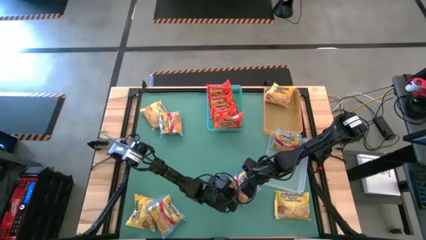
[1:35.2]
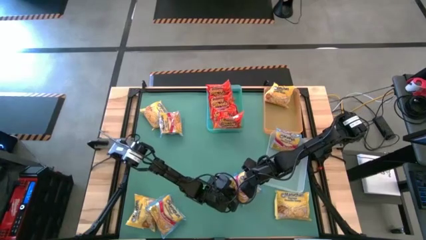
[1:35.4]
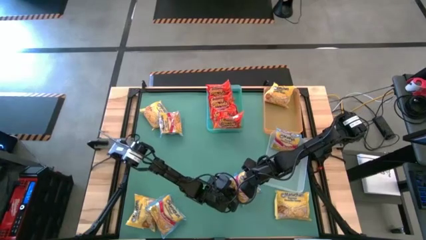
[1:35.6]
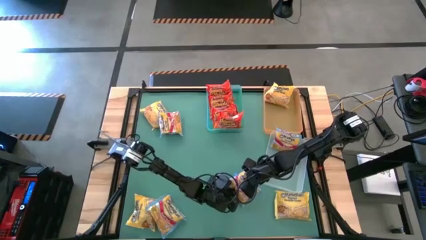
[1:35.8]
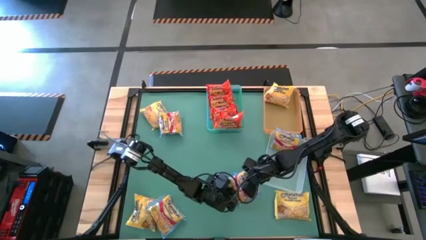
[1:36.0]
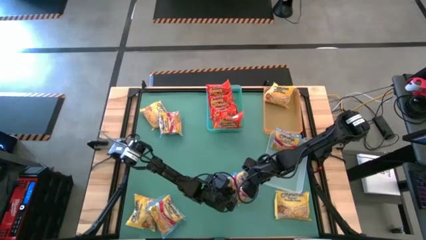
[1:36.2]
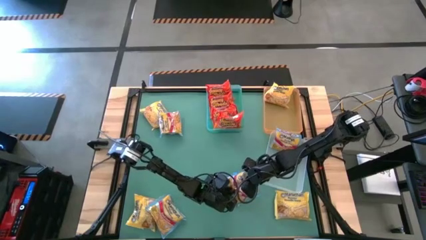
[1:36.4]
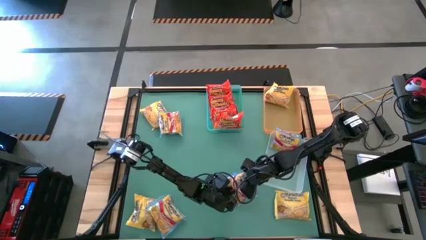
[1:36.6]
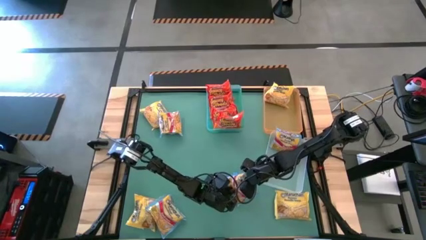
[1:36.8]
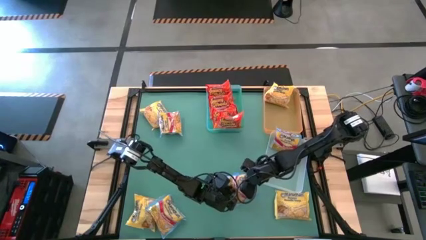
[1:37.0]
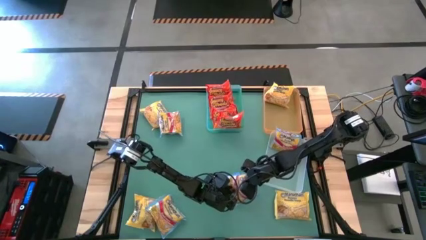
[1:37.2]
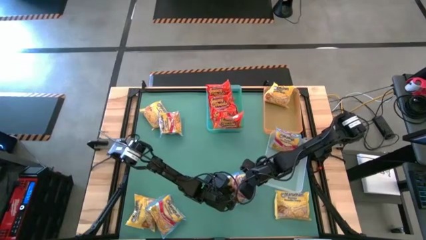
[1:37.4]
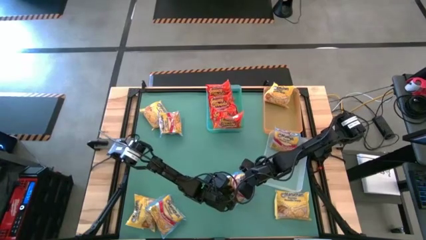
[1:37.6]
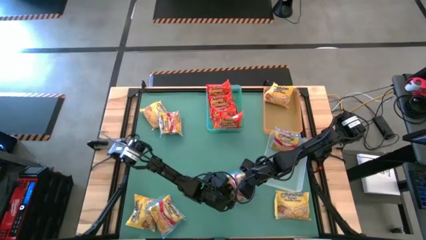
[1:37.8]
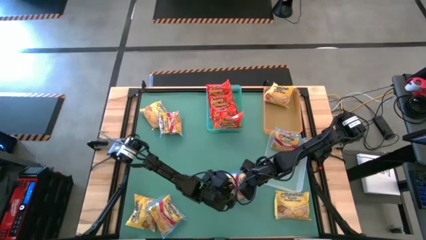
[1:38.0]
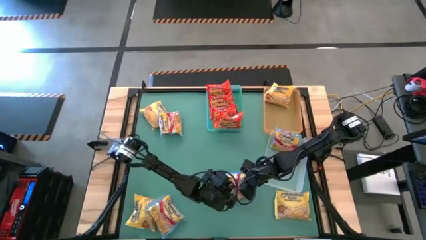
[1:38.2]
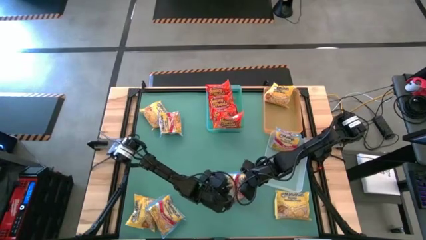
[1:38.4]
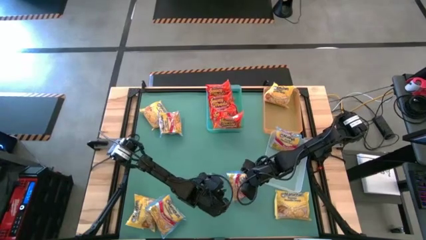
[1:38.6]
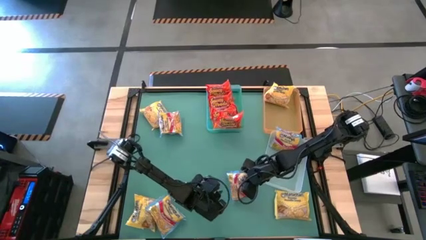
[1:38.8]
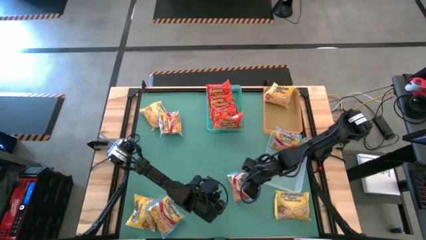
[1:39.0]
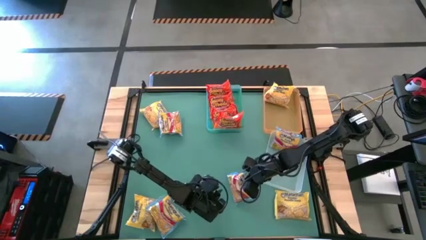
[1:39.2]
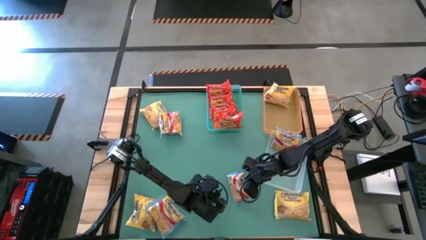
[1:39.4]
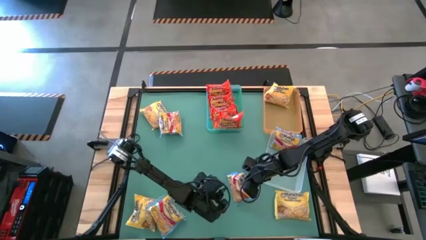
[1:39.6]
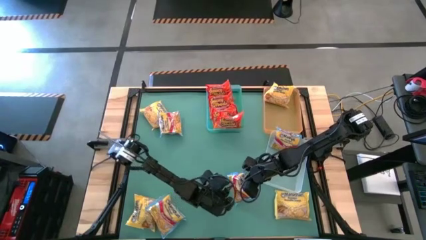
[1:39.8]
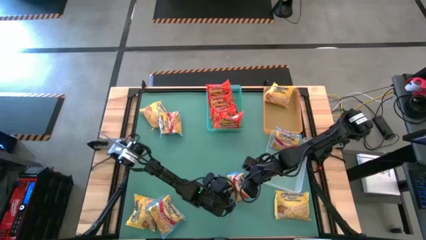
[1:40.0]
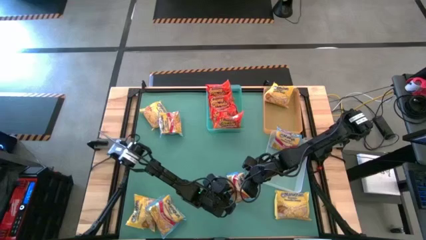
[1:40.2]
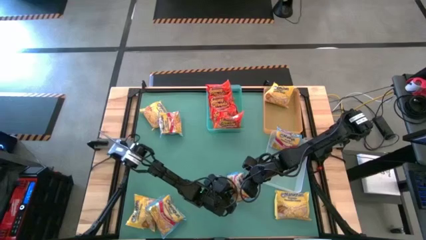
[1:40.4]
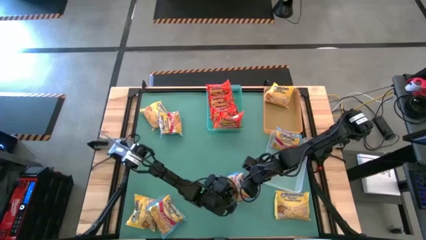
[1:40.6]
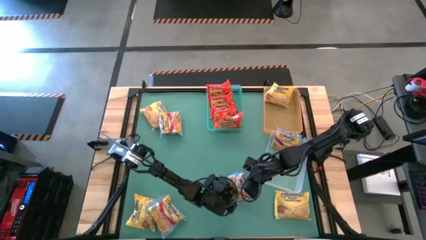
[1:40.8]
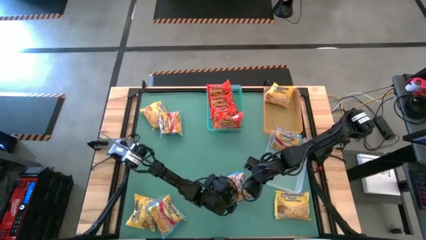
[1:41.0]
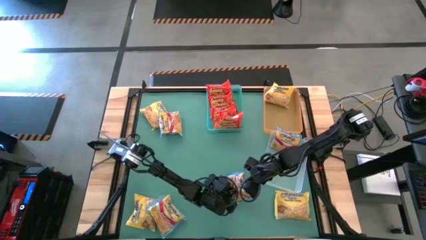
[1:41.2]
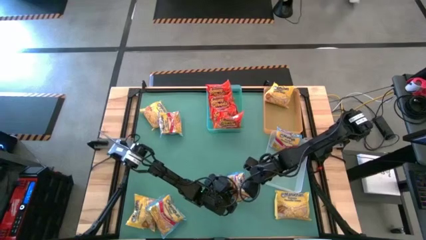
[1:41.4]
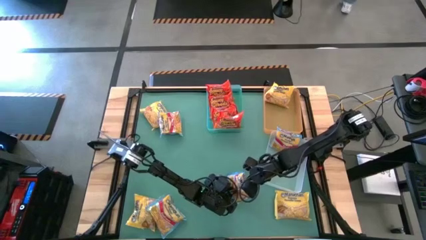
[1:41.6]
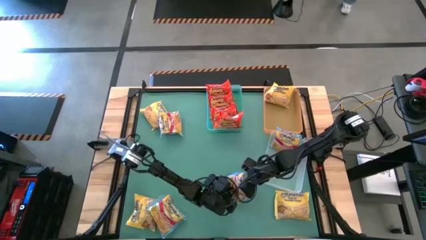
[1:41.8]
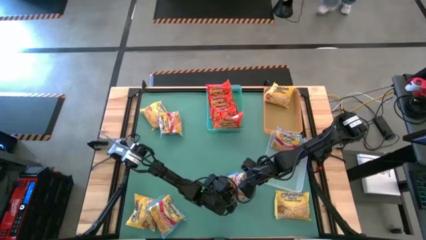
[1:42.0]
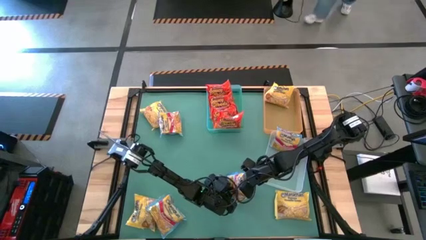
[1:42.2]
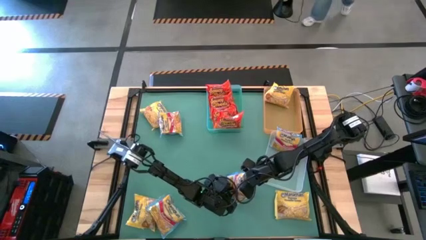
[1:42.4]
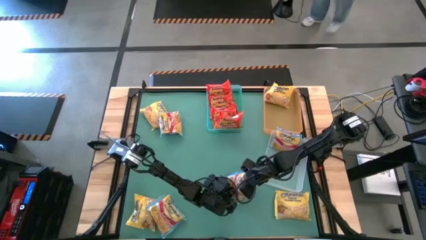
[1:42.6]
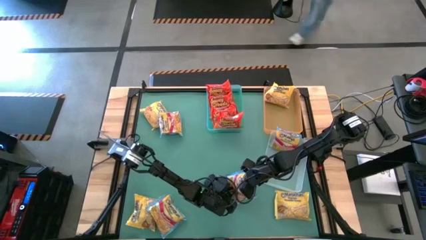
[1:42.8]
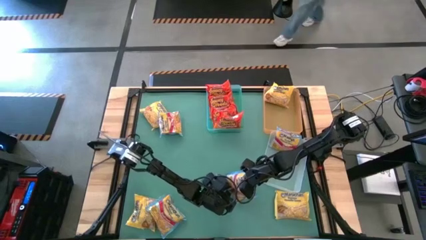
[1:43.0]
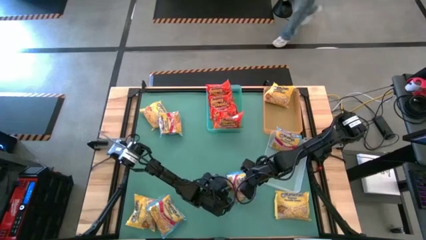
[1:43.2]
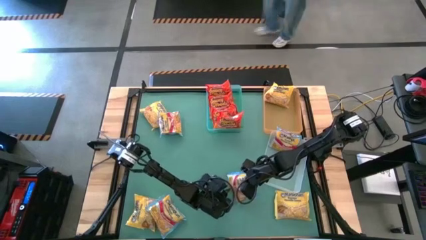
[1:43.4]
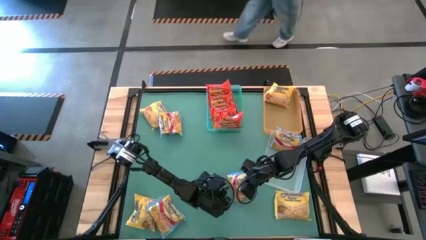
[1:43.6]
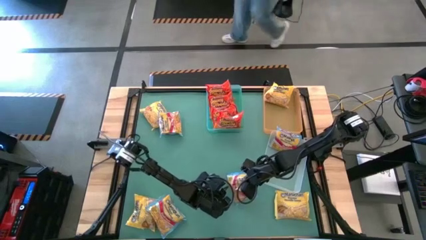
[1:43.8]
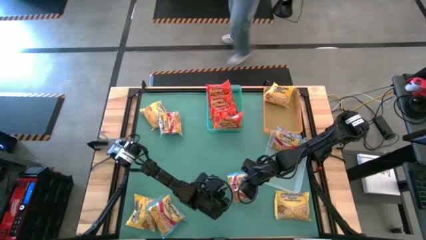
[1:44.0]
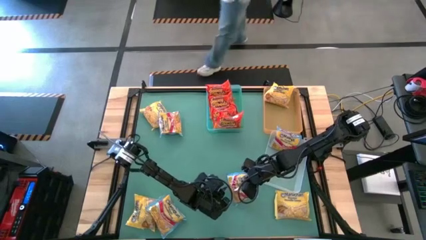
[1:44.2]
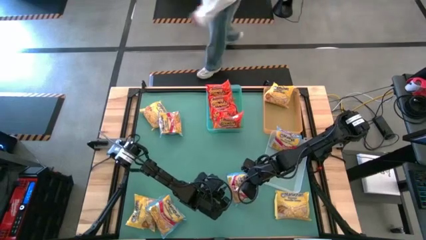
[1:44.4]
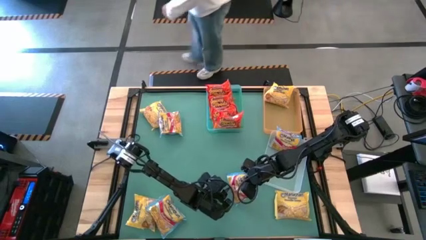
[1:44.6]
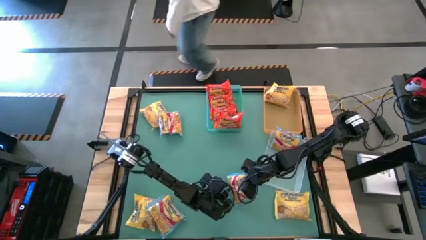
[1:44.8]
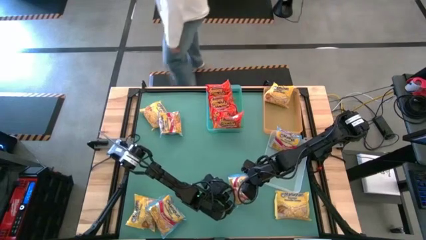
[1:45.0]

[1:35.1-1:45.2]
Task: Sort Maruchan noodles
Put the blue noodle pack into the transparent bin

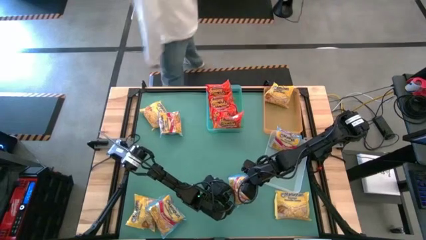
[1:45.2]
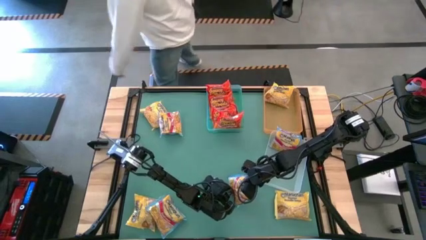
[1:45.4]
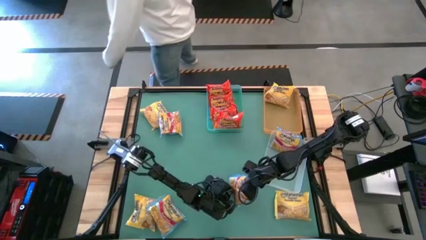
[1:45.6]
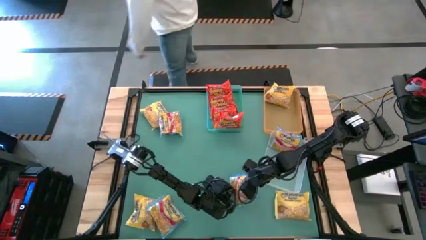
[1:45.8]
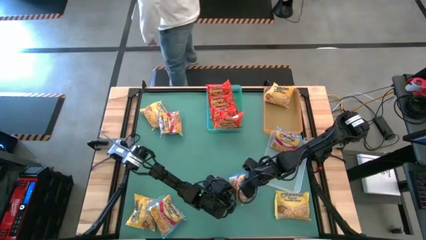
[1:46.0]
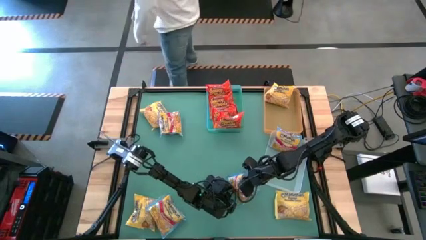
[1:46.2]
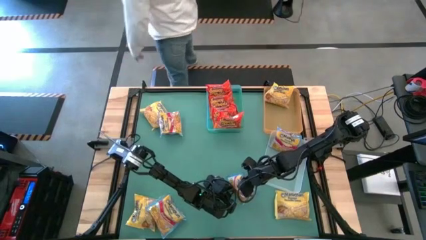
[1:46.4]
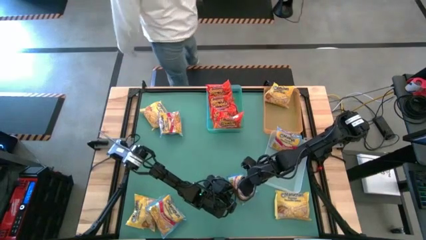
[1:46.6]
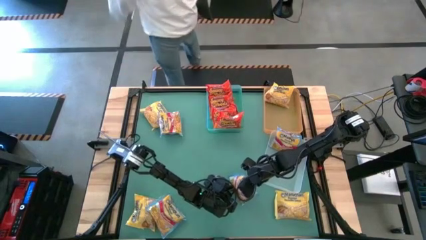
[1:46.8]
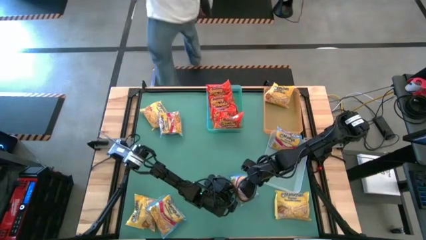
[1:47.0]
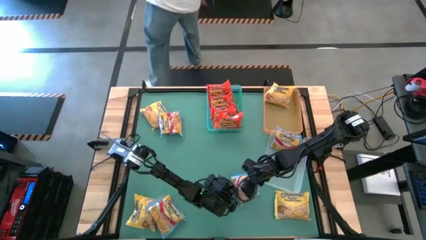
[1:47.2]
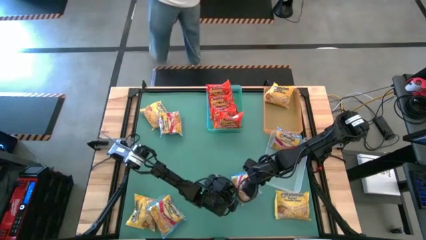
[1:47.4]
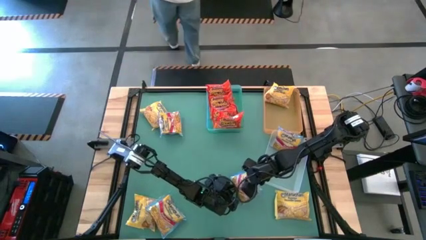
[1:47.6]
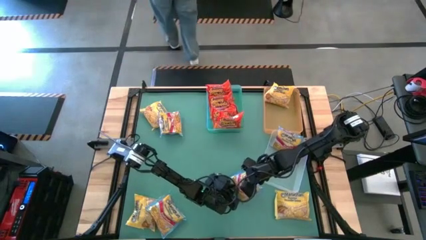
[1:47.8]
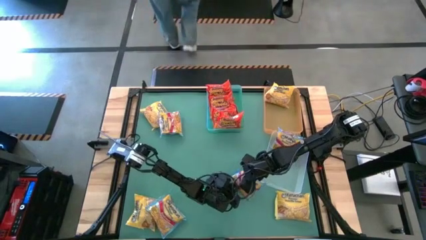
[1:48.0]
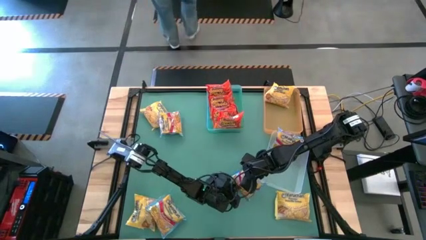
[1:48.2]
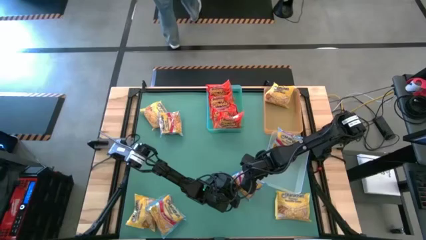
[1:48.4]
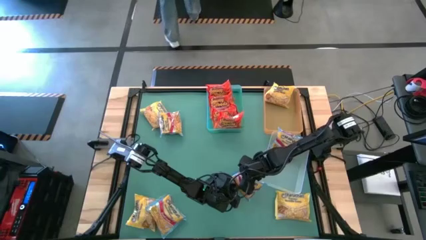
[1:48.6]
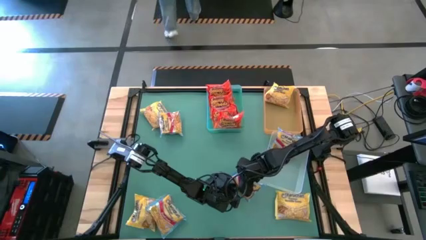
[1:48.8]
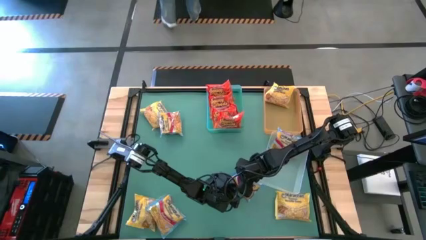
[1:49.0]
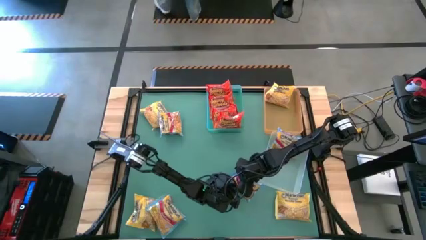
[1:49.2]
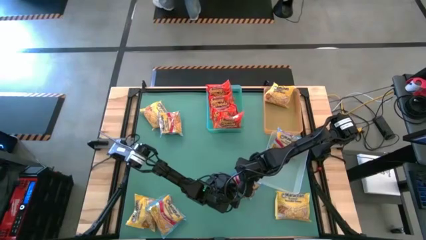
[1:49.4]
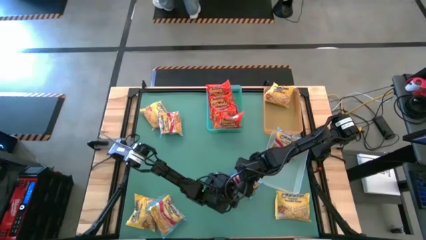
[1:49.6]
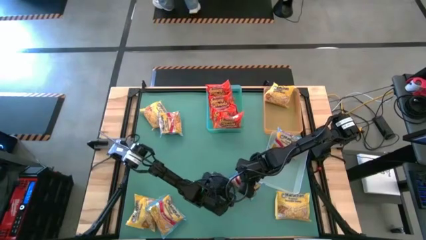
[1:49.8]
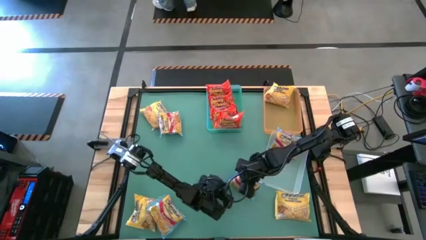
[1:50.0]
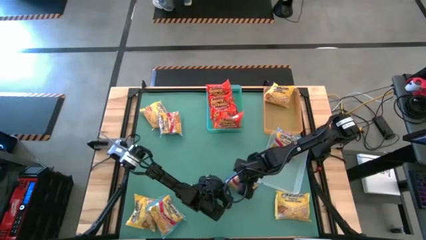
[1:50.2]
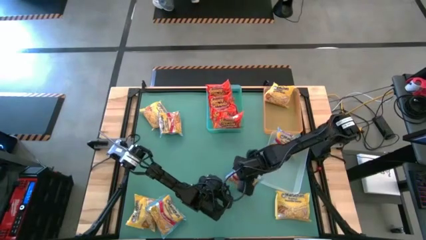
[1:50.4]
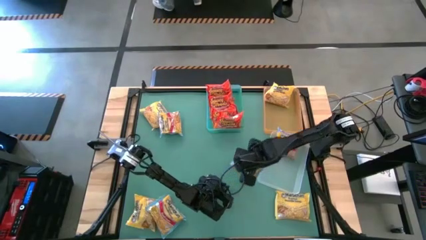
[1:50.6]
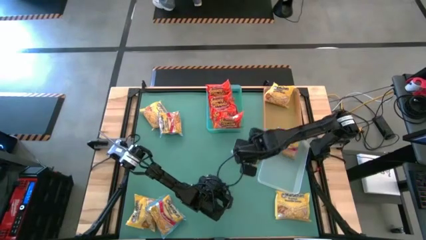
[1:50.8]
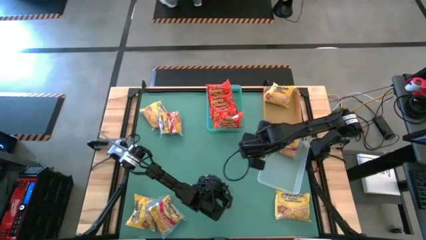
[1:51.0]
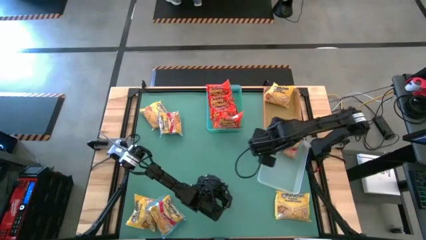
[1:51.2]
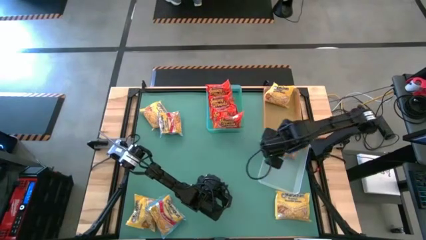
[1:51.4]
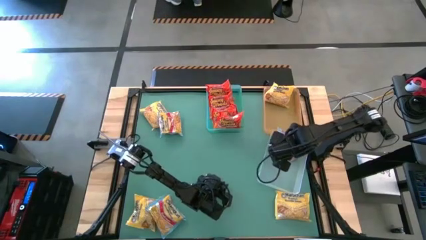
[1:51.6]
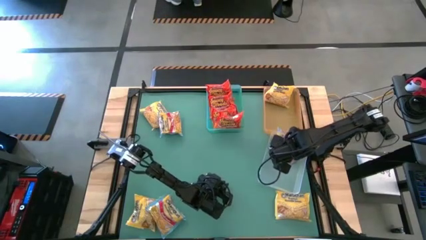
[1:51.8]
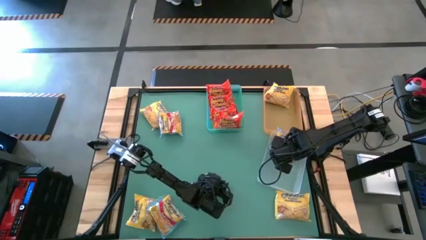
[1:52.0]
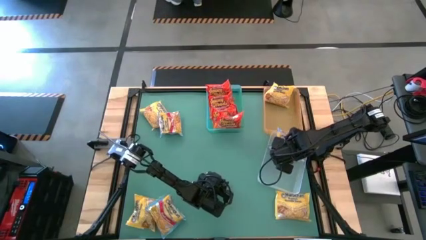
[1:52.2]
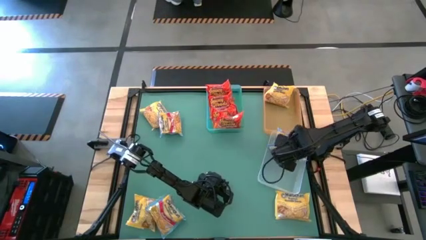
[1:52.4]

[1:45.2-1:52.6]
Put the blue noodle pack into the transparent bin
